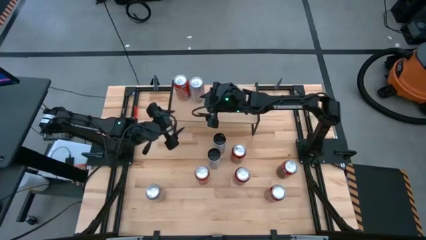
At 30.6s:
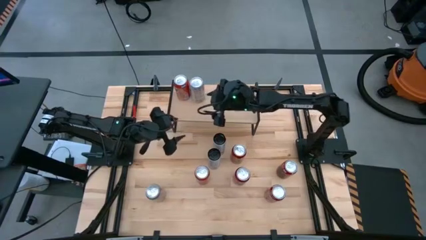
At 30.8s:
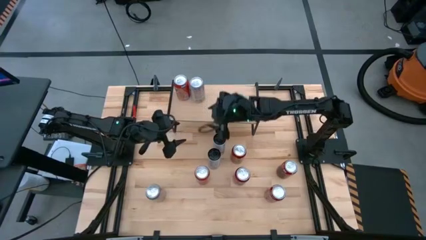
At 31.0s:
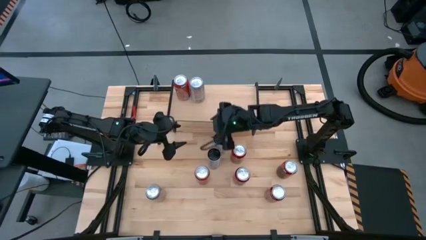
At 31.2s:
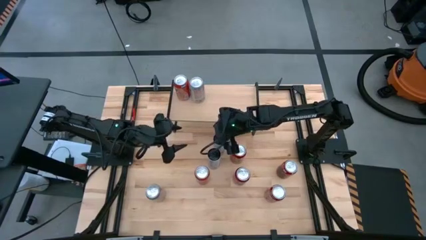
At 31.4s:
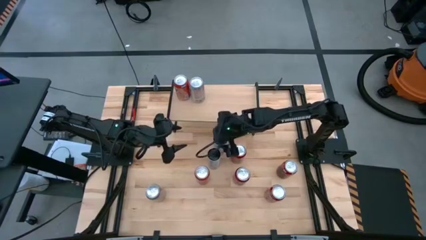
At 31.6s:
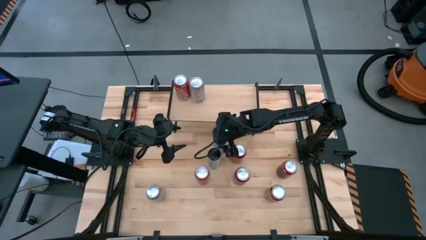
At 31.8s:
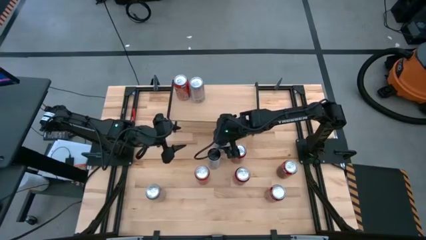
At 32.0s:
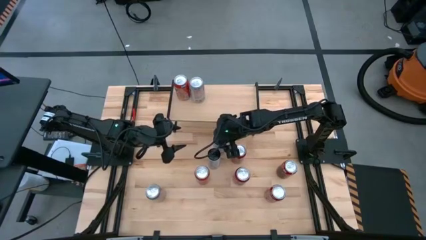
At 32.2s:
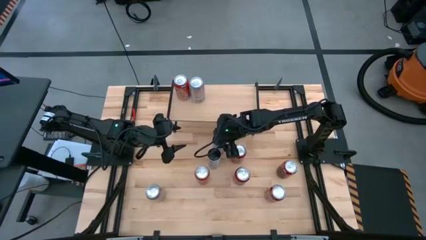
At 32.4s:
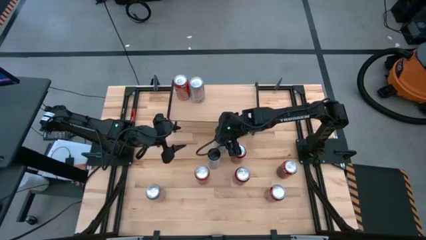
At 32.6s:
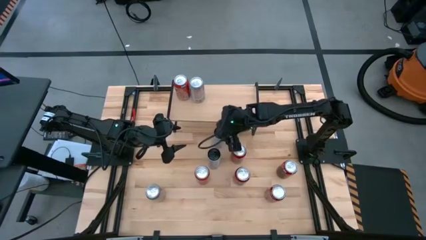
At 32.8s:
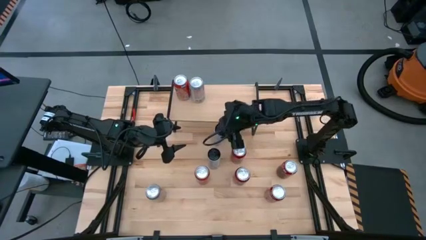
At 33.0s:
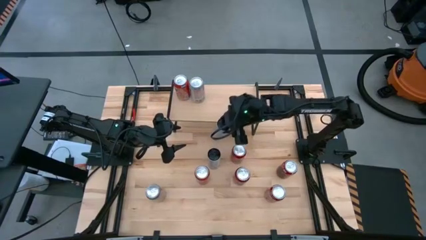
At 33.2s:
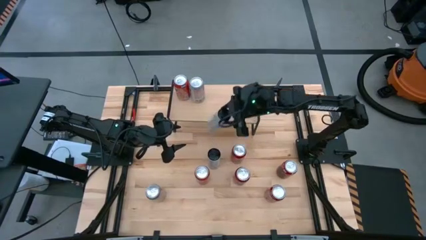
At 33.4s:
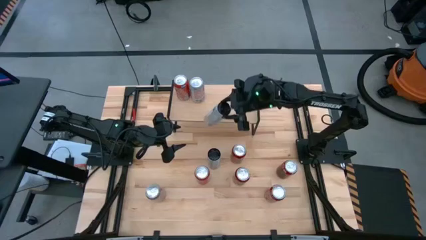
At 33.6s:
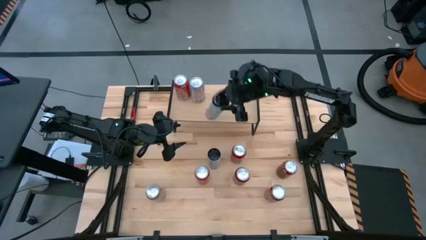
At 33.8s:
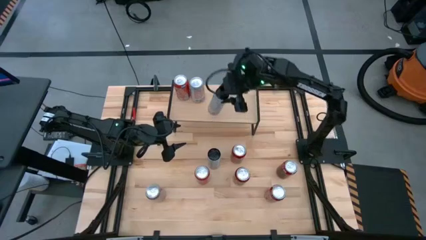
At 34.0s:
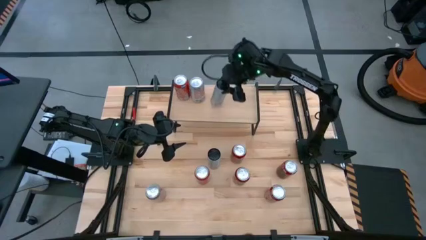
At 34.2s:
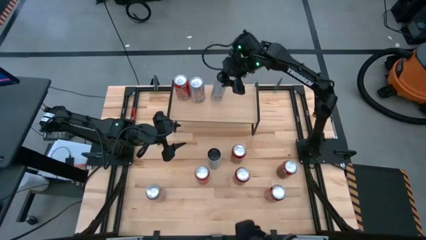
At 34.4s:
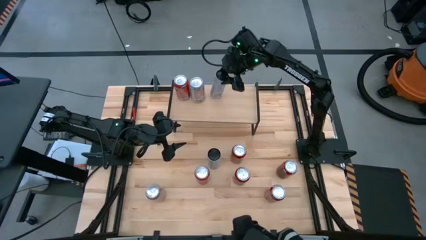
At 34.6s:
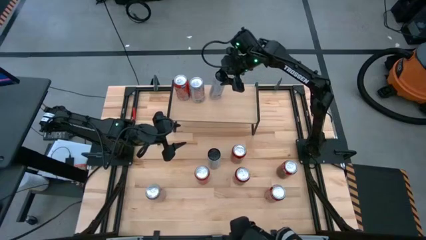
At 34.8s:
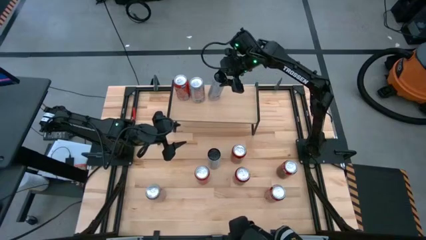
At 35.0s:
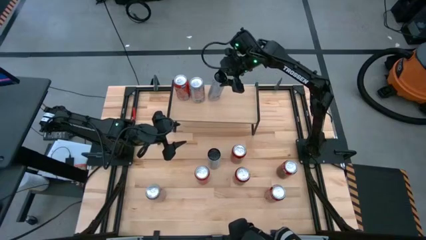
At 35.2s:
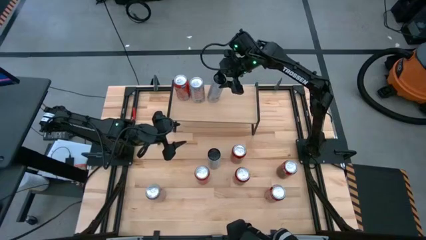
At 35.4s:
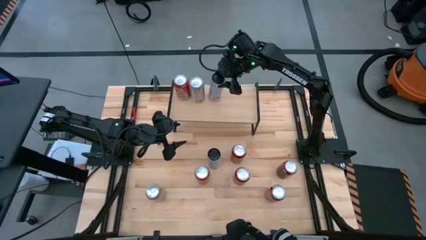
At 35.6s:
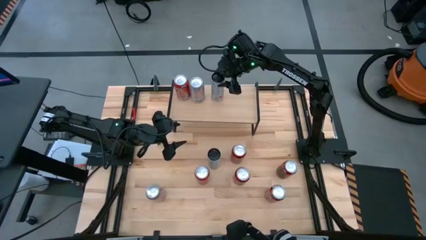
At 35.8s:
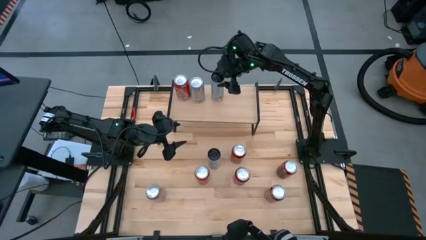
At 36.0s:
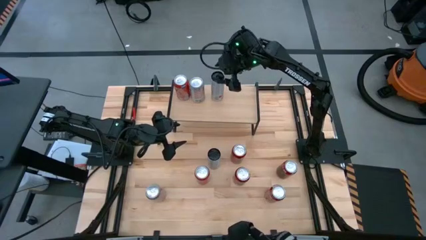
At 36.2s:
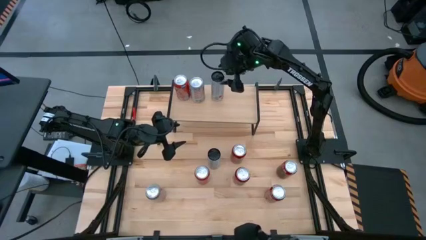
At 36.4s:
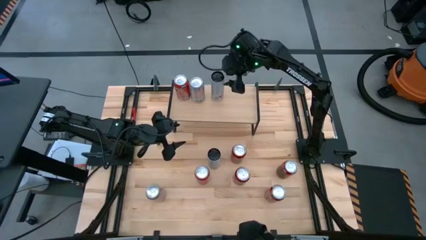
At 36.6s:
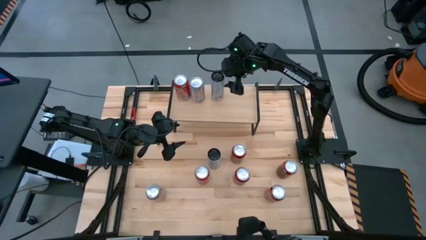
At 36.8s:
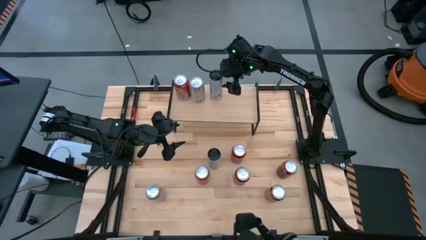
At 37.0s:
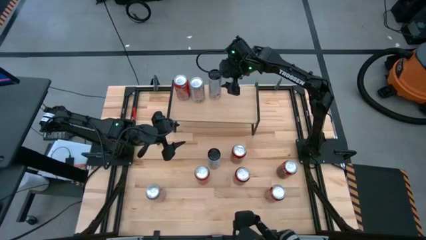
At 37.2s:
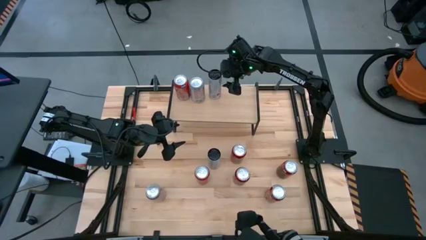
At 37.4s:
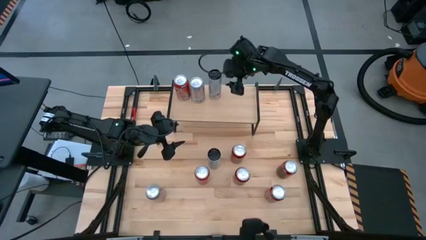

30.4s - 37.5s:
Task: Place canned beverage on shelf
Put the top white soda can on the shelf

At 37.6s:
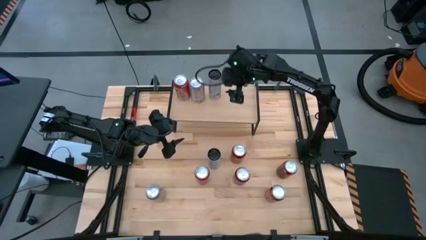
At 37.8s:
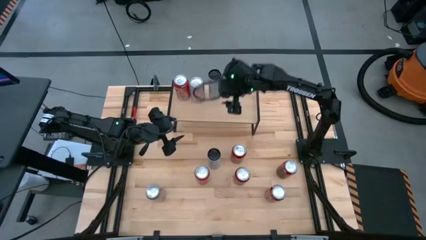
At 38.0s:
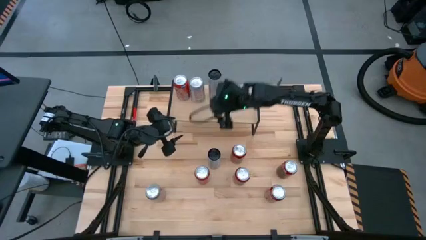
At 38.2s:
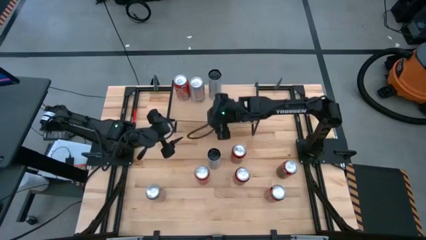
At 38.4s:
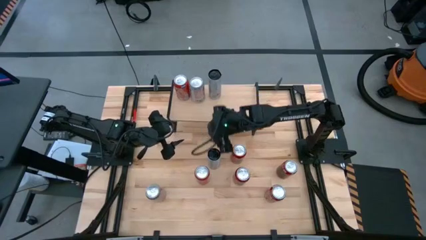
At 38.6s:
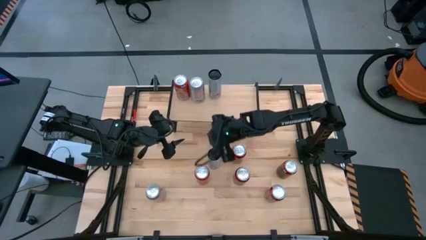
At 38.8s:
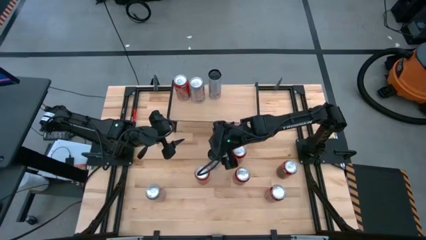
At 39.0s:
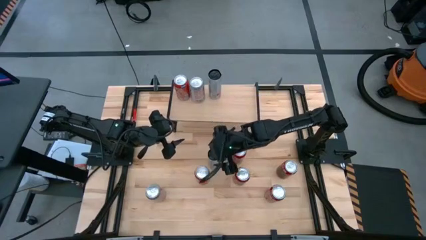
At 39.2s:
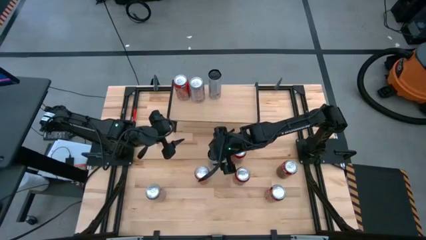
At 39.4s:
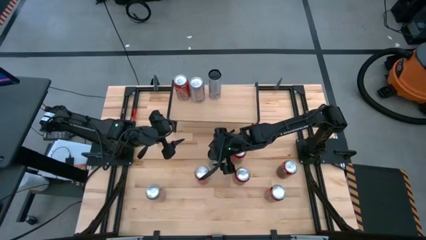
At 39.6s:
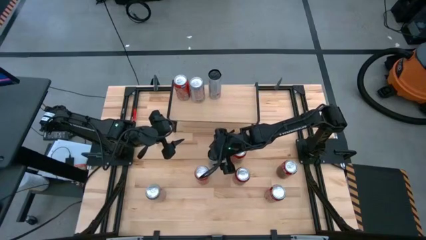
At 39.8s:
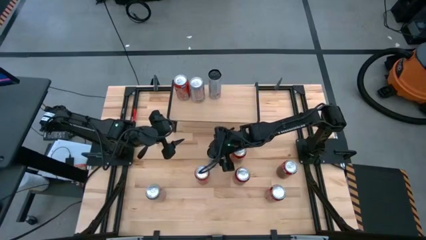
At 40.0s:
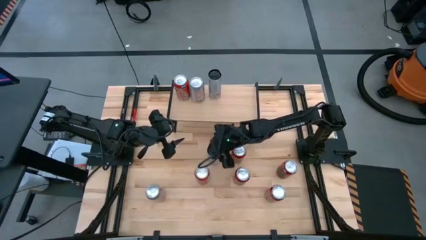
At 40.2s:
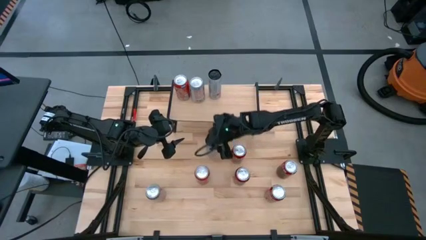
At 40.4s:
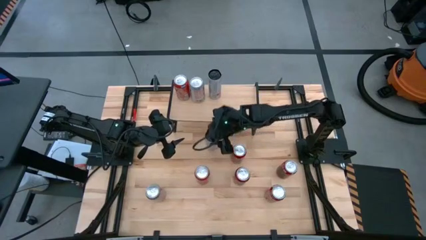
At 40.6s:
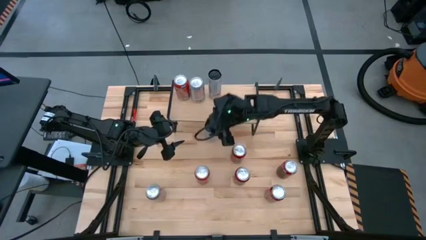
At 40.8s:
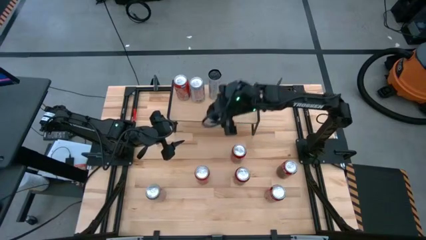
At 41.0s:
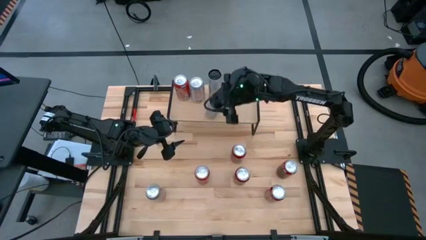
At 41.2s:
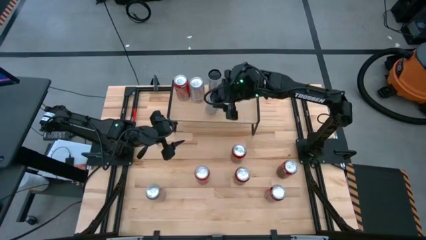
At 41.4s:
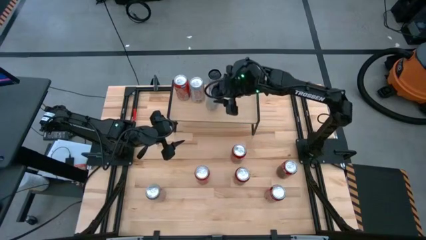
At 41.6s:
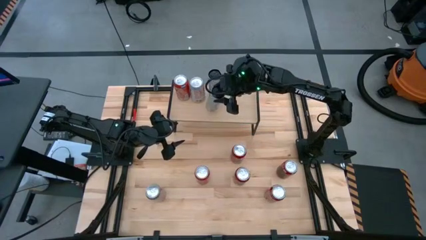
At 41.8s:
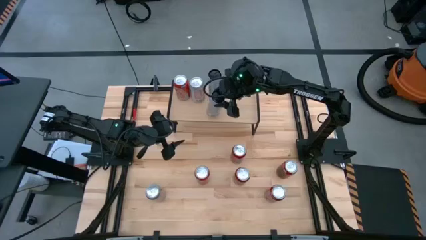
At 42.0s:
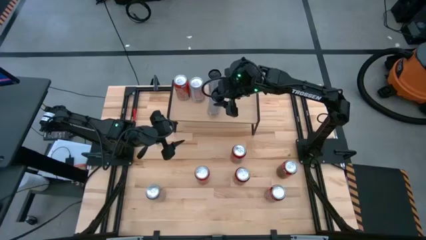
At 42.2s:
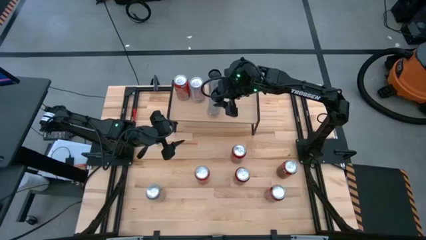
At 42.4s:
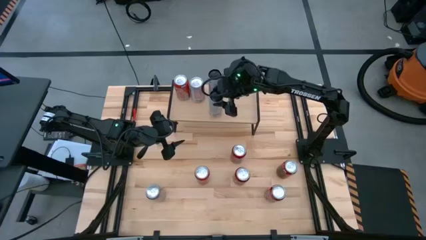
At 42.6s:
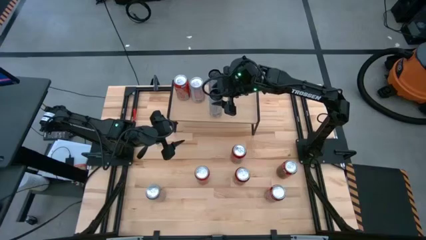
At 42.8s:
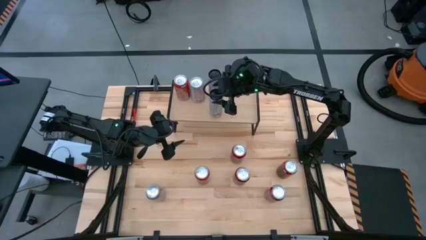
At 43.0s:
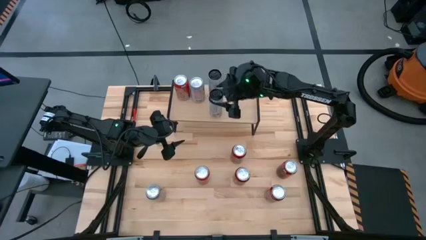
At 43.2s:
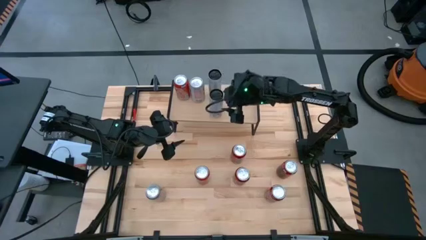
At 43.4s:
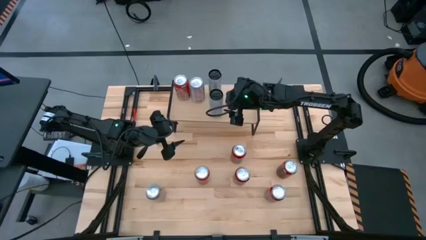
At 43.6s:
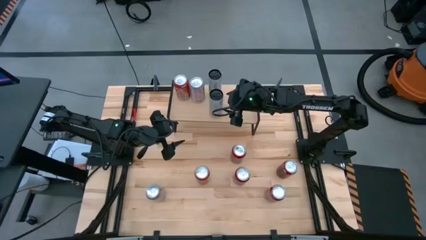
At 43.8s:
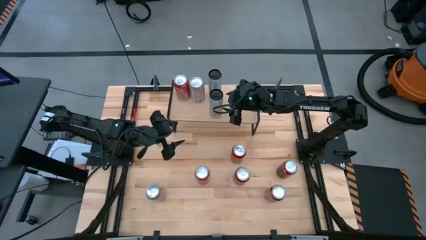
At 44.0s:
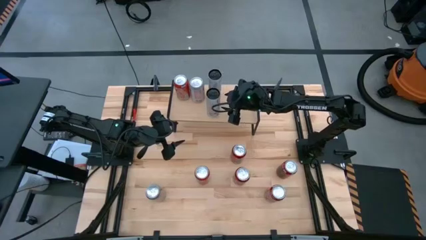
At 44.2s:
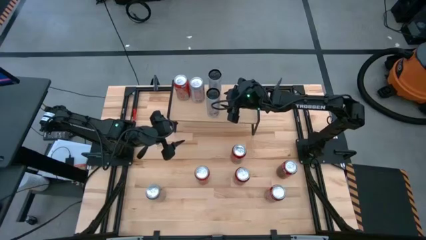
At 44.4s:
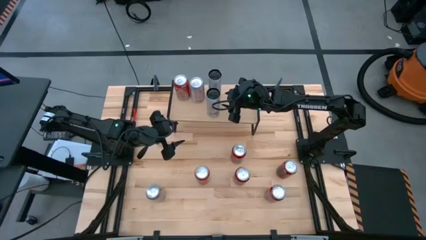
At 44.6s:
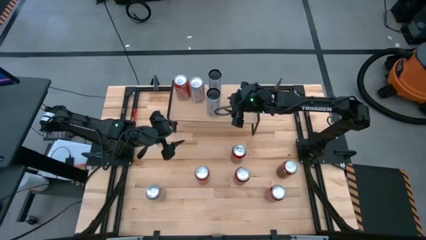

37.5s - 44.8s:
Put the white soda can on the shelf

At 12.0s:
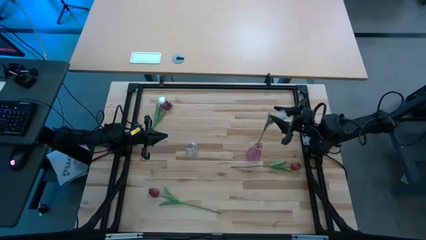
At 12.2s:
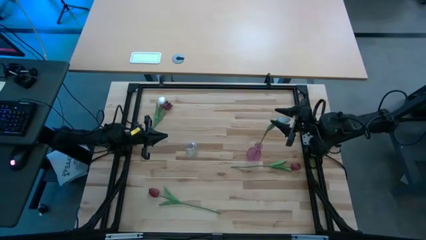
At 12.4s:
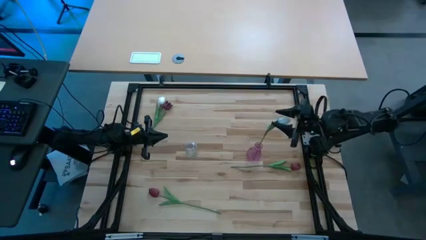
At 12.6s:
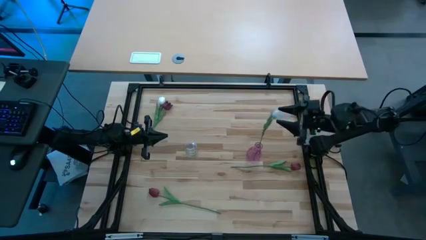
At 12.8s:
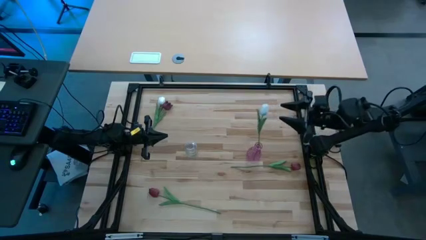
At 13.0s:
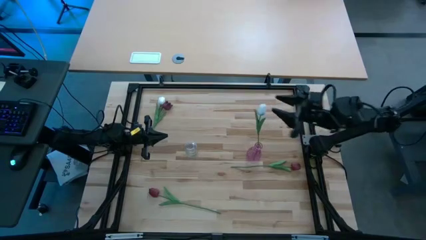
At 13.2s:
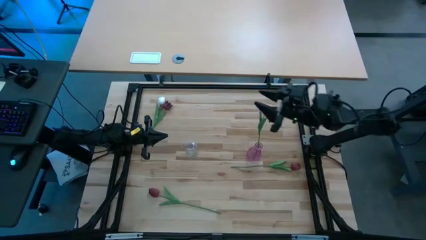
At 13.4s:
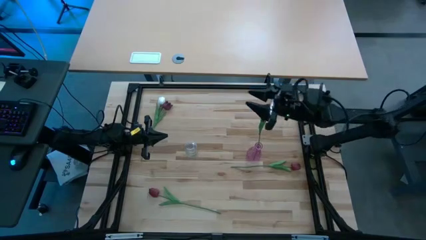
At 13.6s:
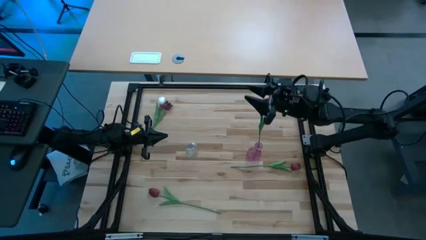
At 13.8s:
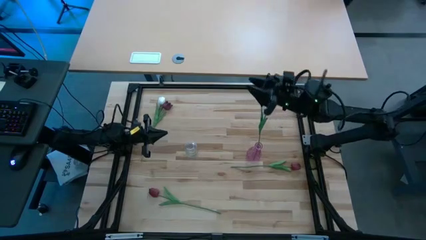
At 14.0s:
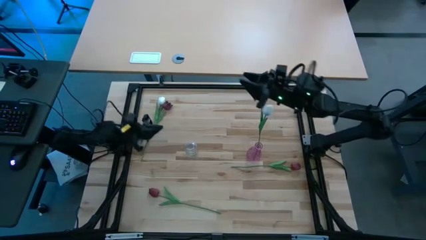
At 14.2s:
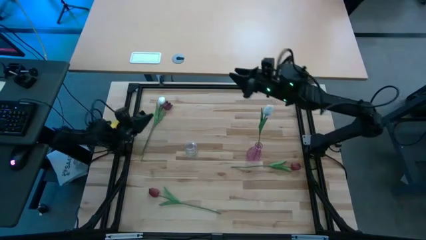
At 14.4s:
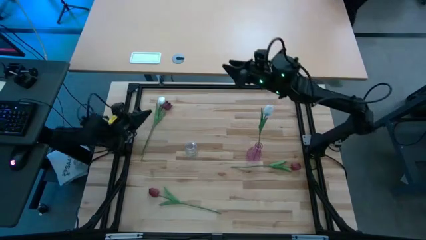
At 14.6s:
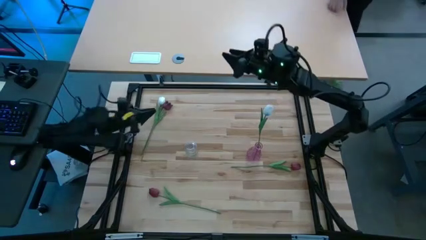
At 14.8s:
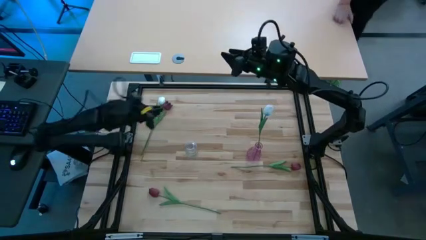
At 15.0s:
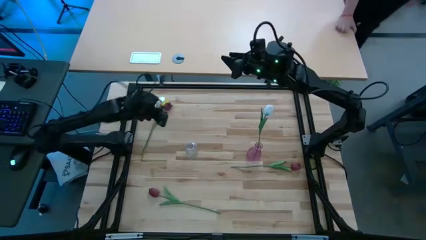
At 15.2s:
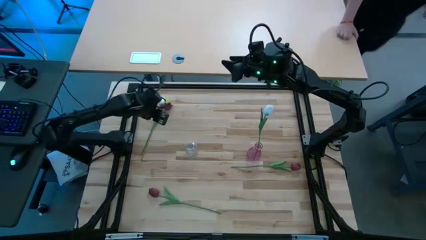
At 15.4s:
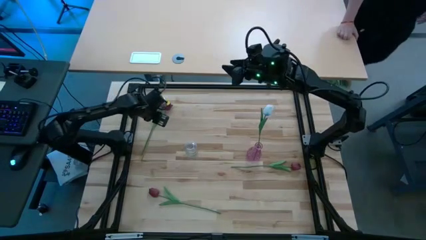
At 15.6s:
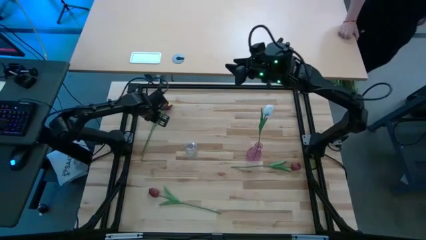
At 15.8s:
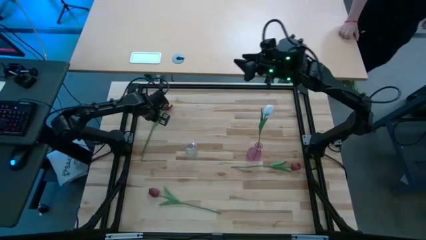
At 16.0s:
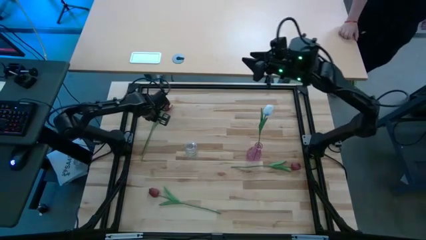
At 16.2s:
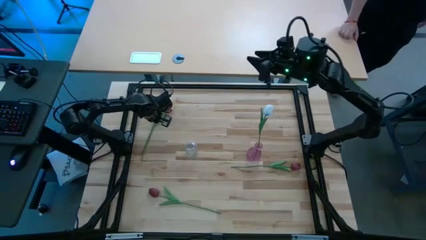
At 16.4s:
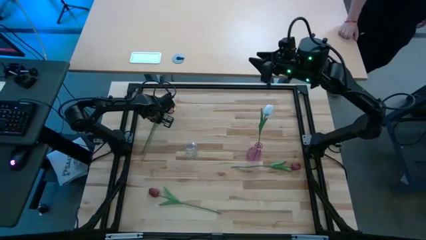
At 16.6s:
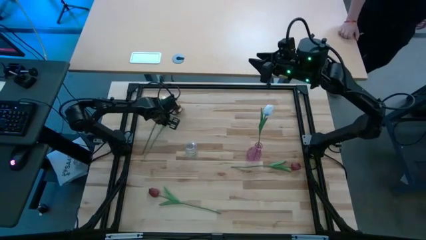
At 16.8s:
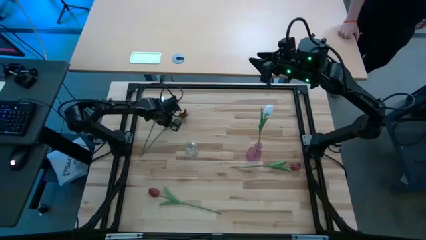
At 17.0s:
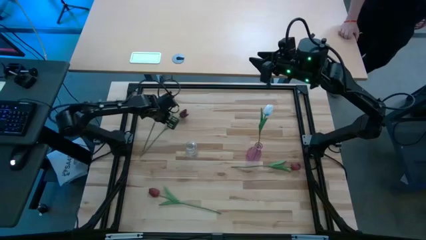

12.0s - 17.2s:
Task: Sort flowers into vase by color
Adjust the top left red flower
